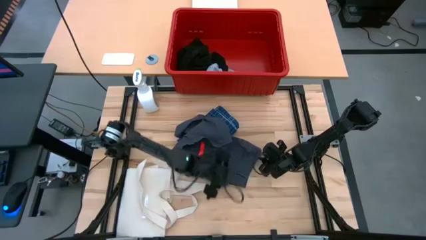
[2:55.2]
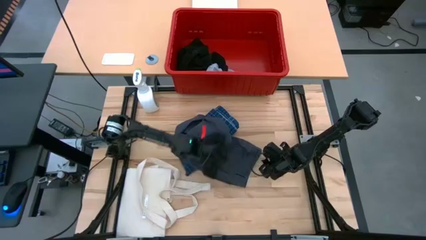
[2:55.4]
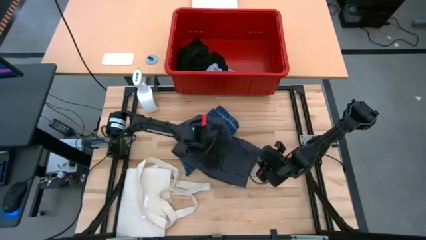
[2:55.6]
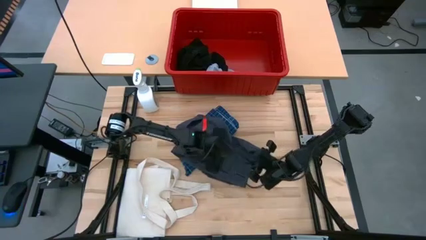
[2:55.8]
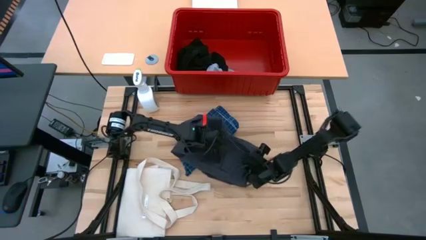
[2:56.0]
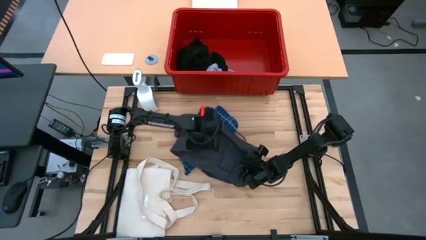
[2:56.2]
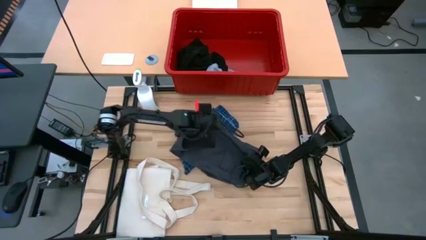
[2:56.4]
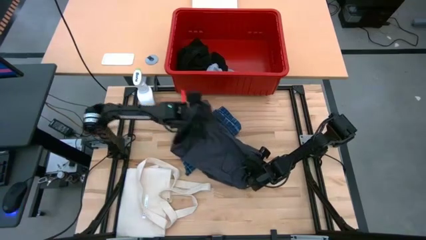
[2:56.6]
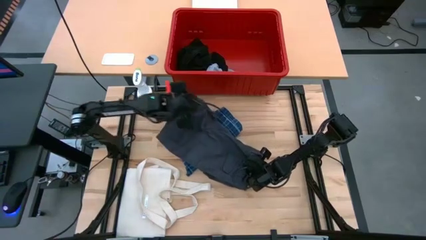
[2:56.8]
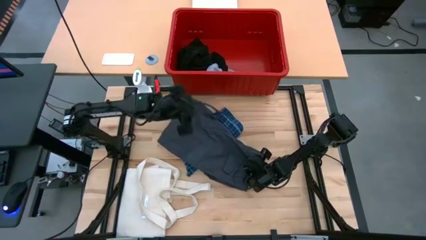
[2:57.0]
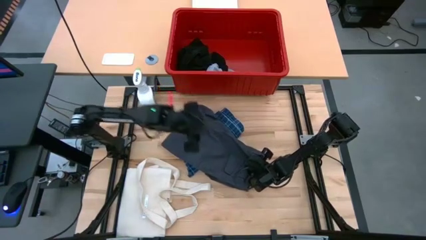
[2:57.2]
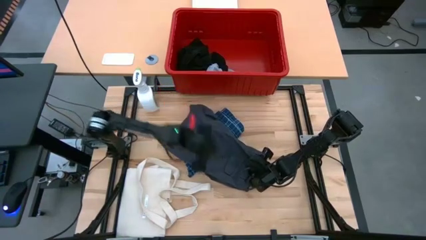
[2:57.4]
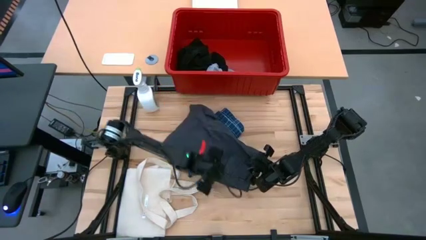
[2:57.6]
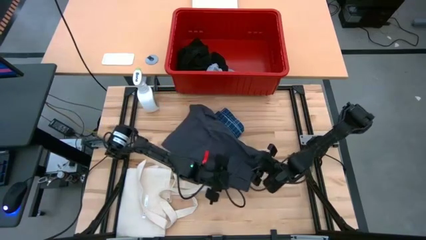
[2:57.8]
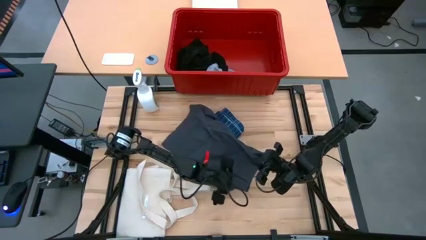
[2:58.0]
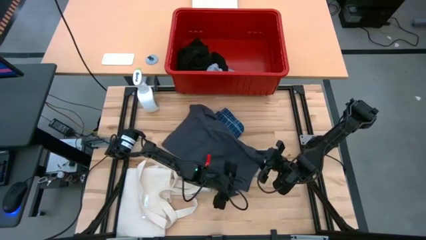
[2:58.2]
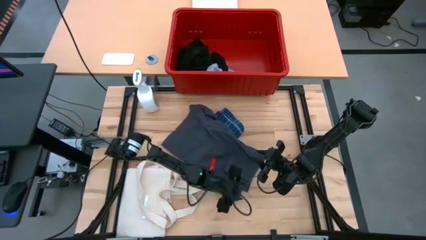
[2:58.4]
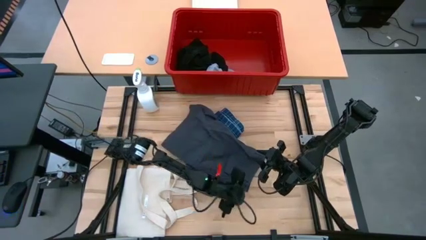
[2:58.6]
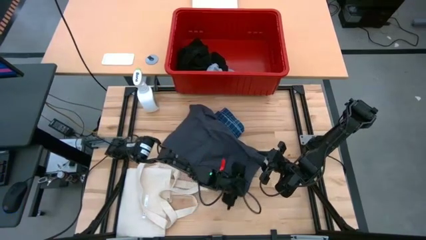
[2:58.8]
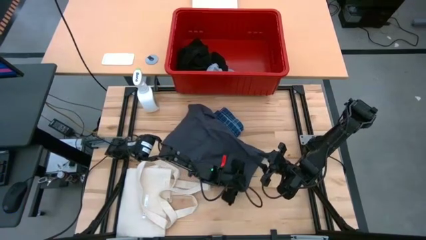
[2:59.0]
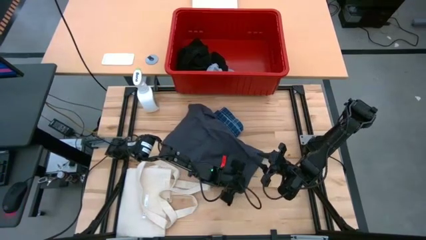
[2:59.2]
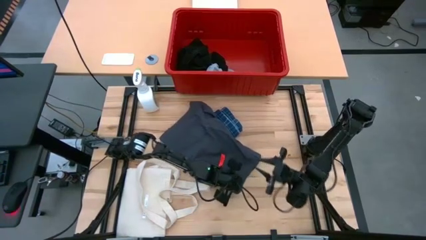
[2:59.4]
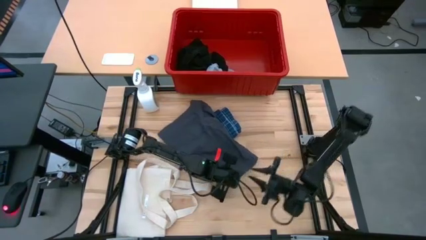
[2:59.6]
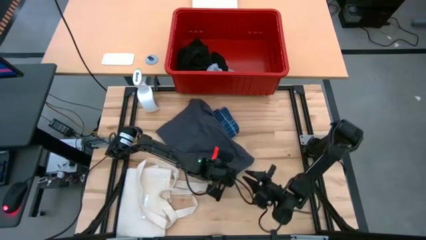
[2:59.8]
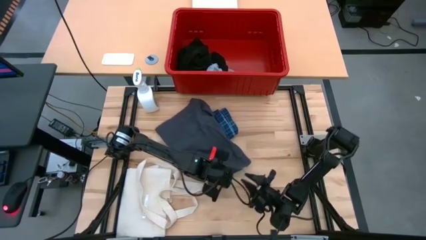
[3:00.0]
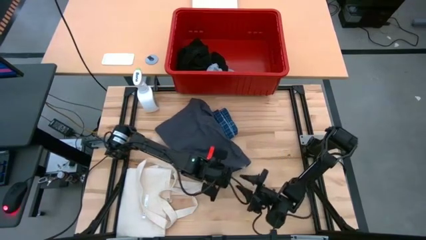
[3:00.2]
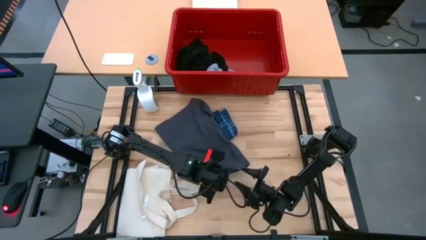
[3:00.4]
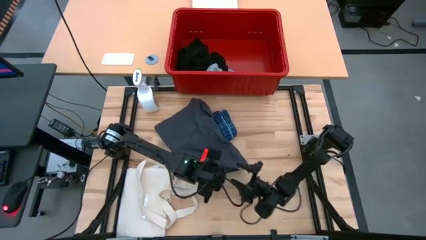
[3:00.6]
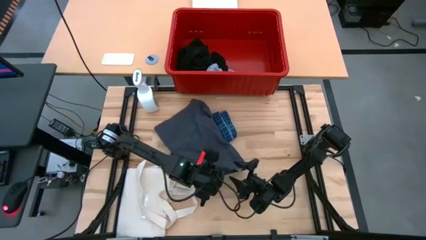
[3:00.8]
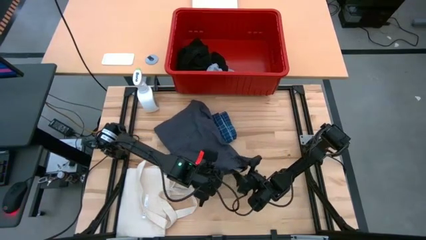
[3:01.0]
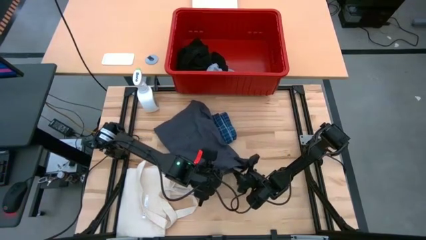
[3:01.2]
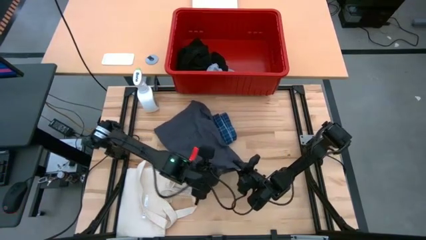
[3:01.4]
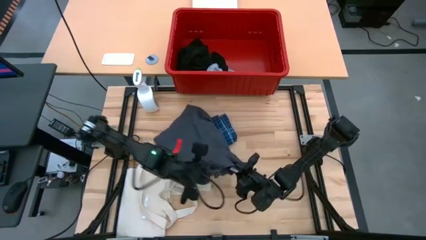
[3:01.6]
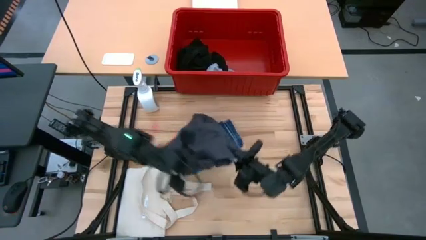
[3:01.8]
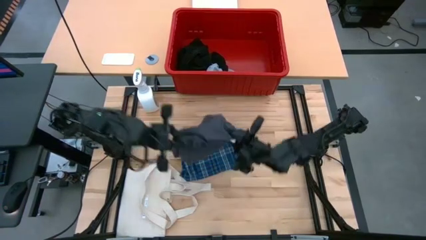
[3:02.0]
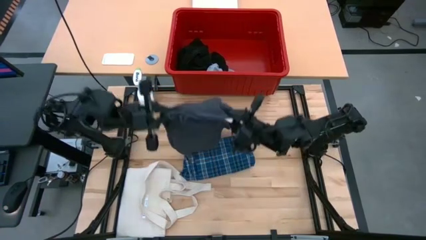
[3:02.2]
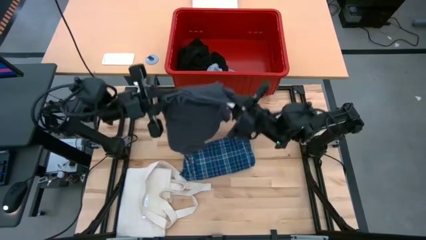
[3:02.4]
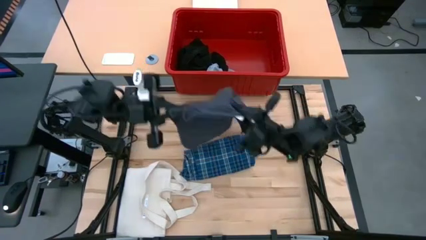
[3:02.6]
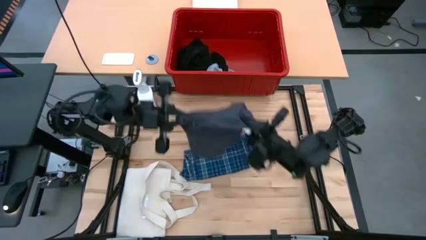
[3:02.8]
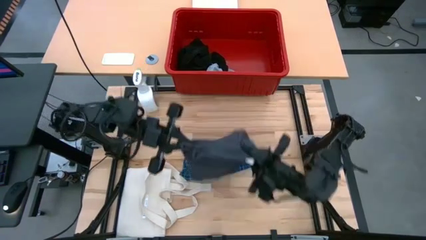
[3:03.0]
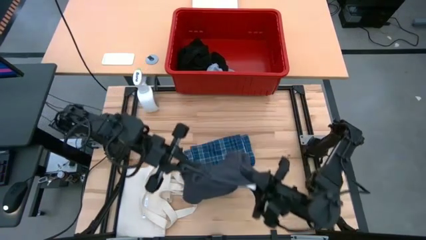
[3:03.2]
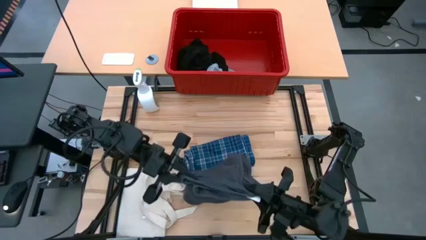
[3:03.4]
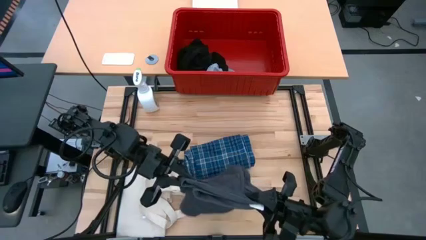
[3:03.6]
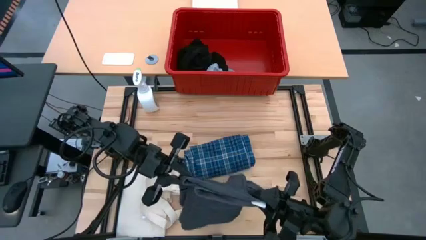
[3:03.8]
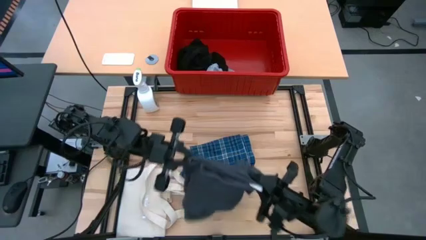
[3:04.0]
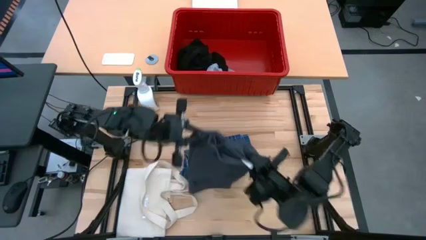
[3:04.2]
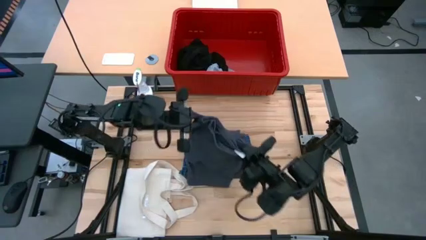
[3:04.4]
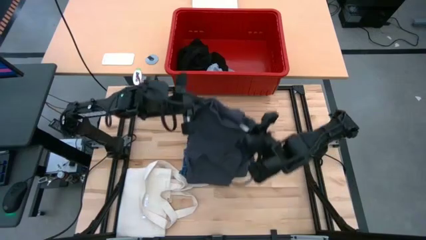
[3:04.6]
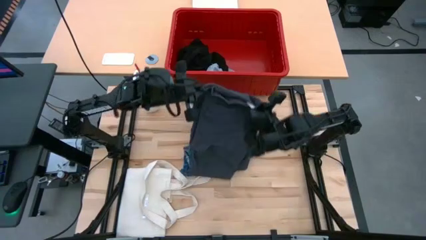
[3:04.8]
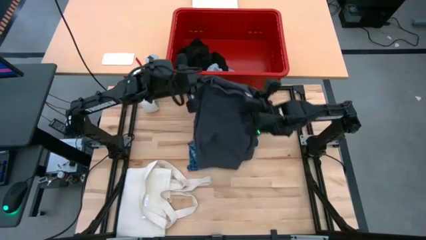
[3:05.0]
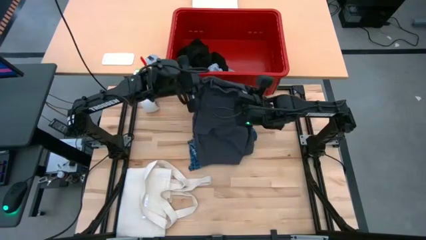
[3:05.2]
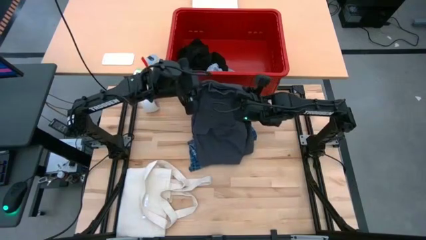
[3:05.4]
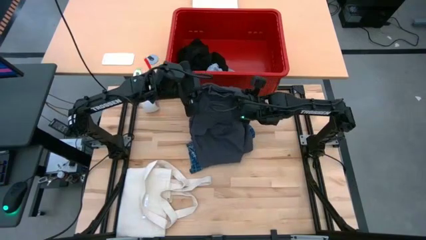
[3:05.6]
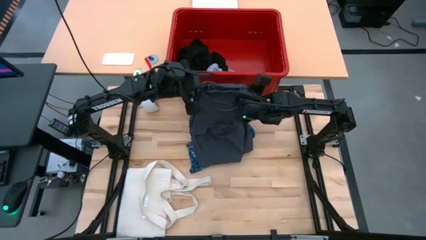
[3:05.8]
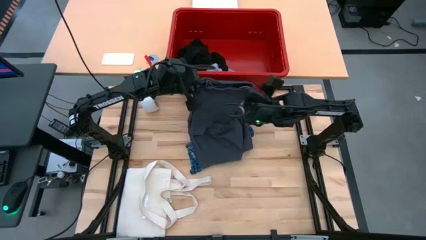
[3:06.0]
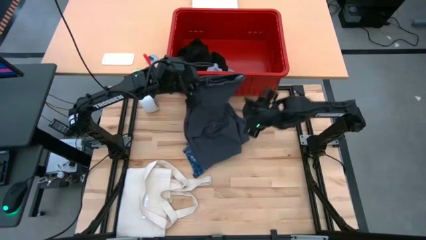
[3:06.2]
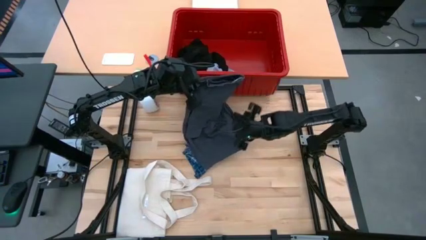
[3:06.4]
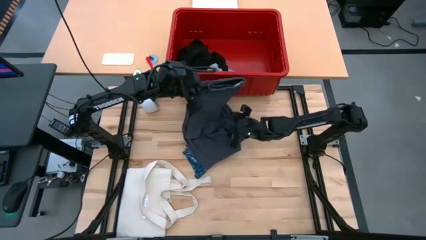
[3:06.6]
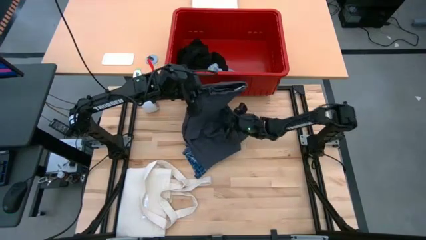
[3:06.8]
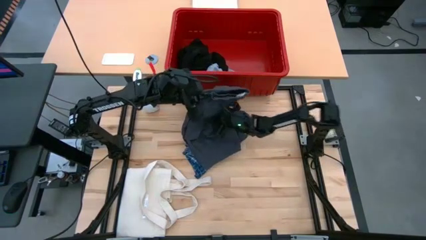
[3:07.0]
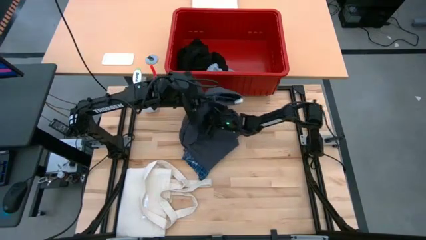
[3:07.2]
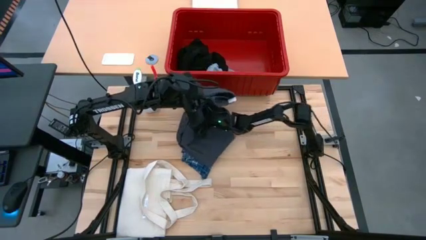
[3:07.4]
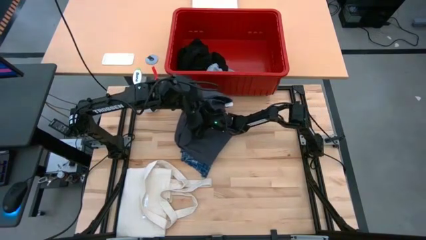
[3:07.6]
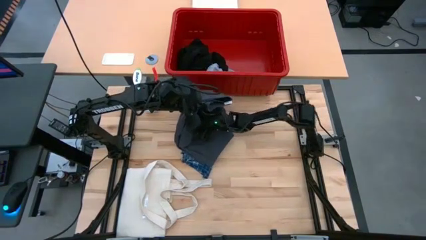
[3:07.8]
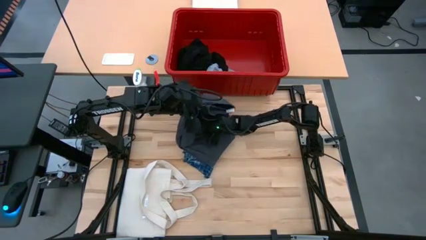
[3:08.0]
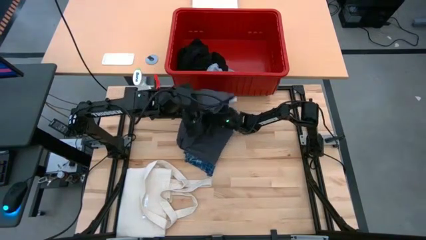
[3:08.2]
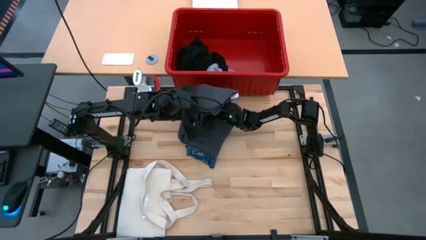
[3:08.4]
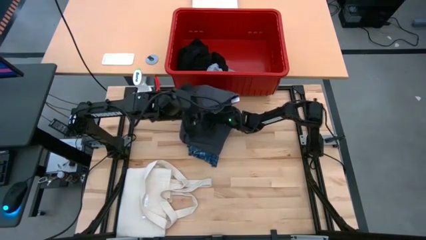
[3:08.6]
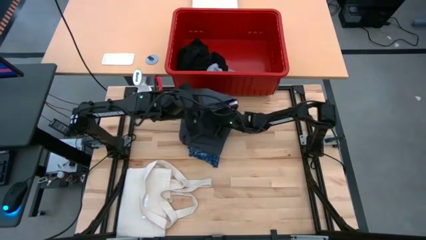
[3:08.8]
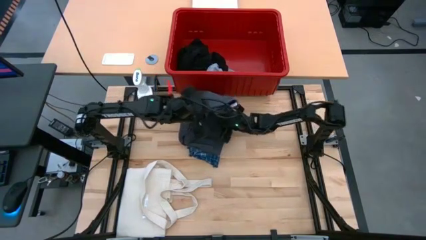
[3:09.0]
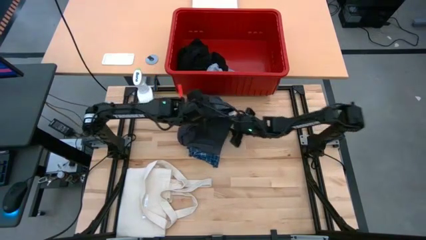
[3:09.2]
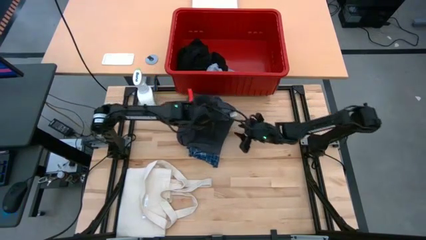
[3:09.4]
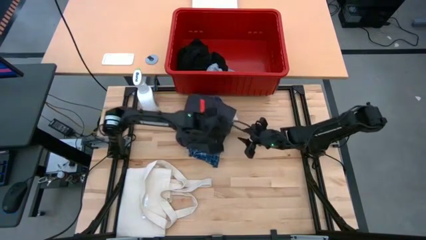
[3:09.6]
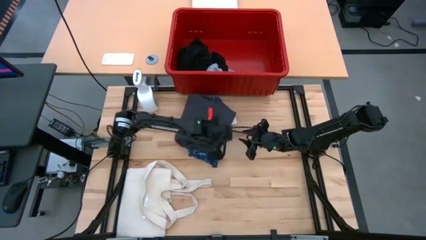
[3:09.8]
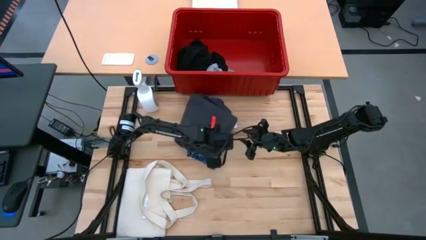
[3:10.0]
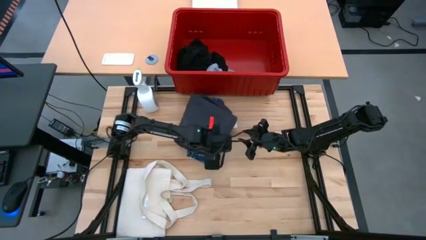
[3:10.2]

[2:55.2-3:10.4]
Task: Fold Laundry from Bin
Fold the gray short
